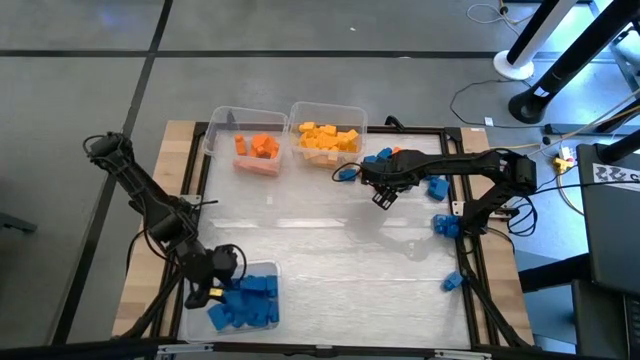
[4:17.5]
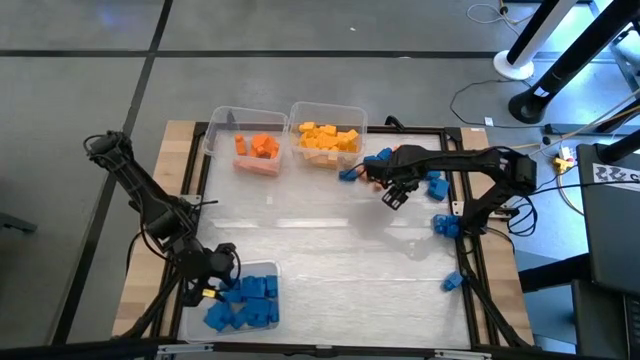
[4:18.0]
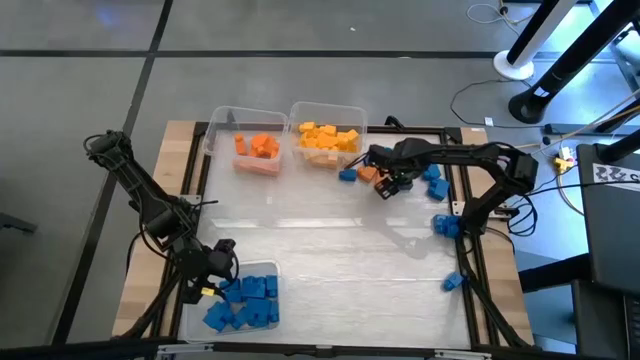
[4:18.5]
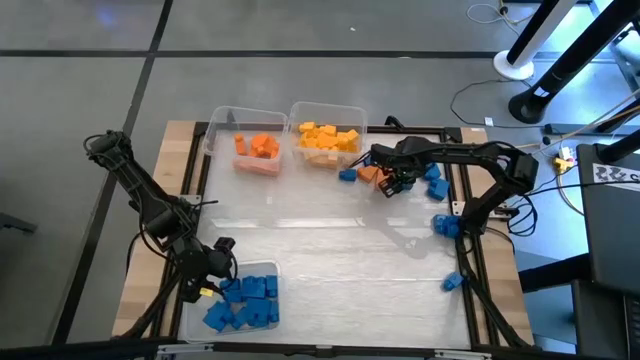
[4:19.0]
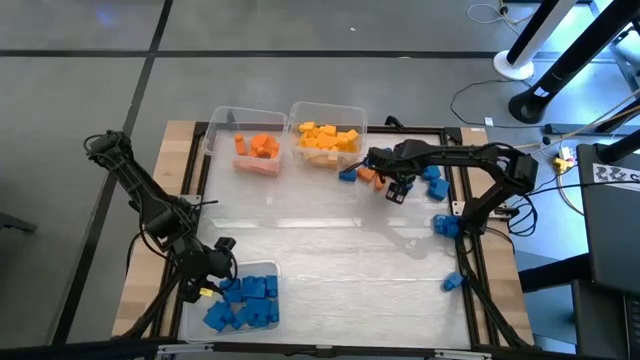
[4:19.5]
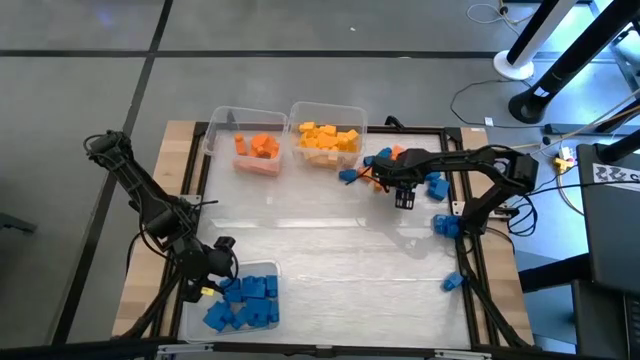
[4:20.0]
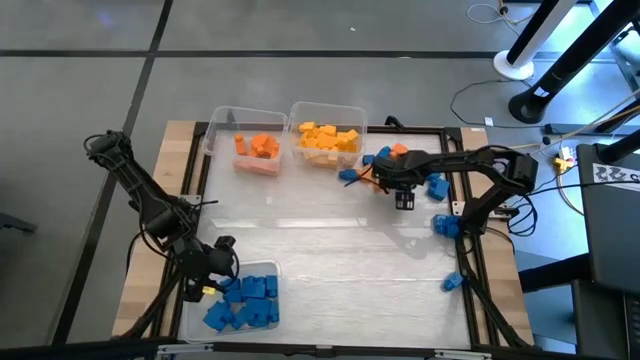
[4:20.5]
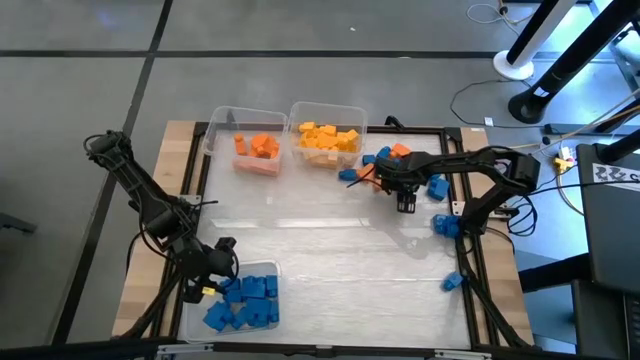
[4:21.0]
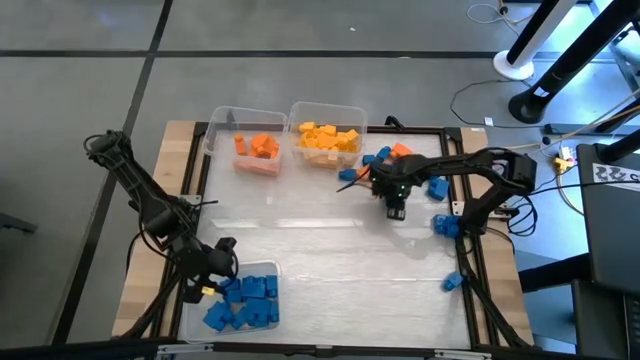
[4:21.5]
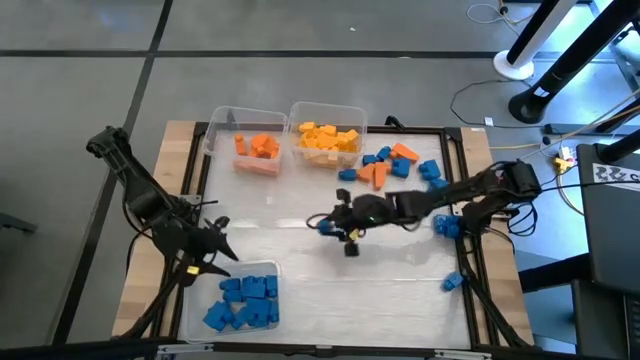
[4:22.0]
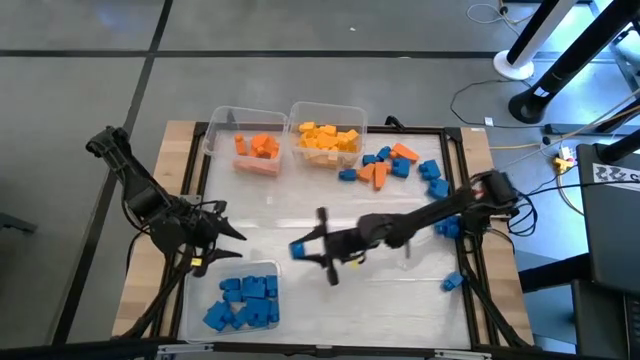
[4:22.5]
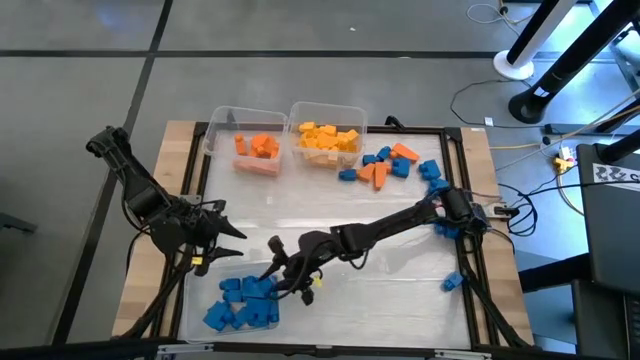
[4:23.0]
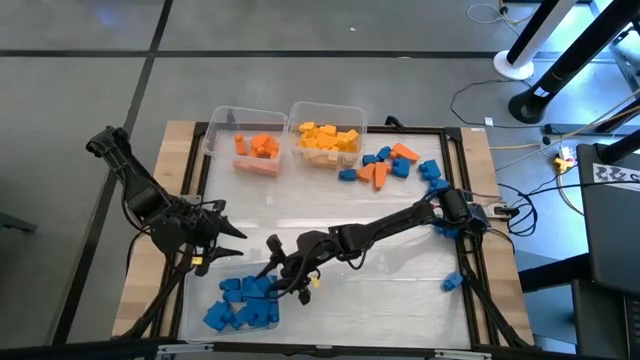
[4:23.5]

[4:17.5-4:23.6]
Task: Sort blocks
Put the blue game piece into the bottom transparent bin

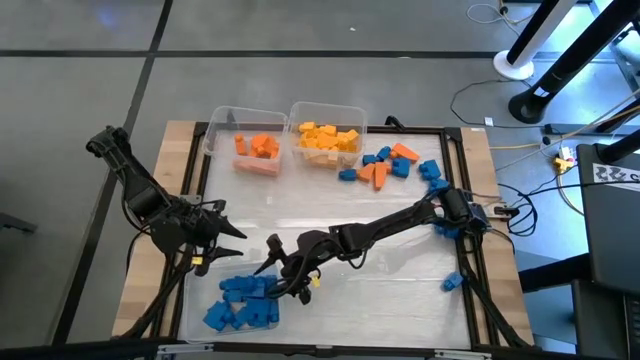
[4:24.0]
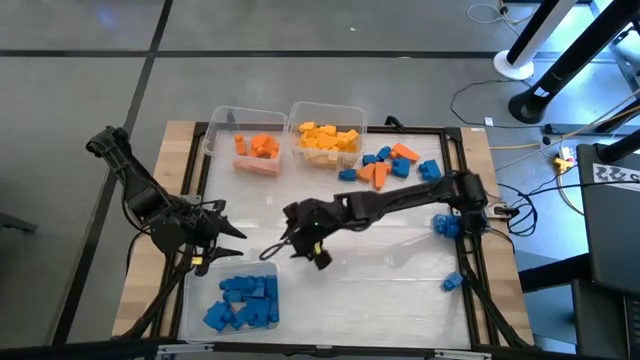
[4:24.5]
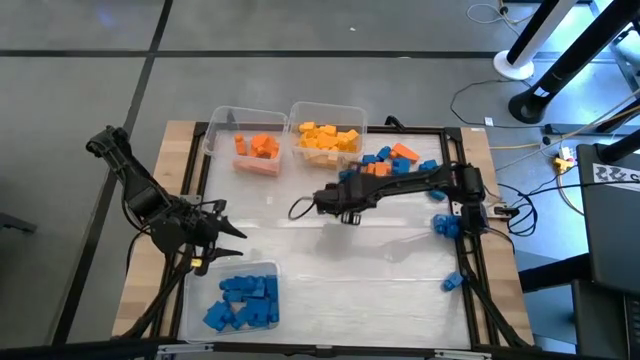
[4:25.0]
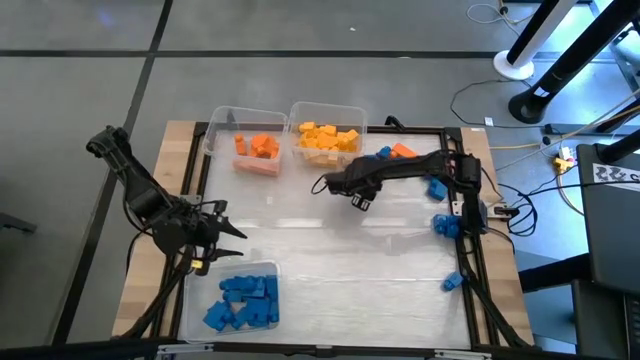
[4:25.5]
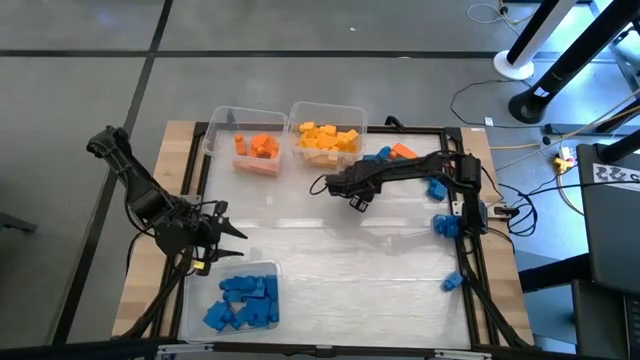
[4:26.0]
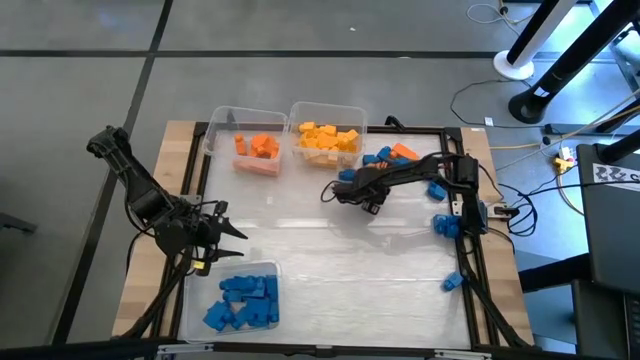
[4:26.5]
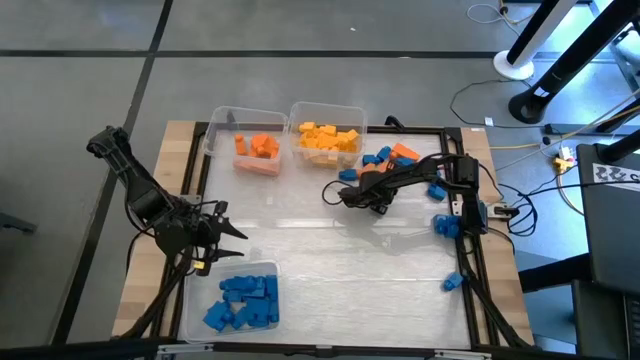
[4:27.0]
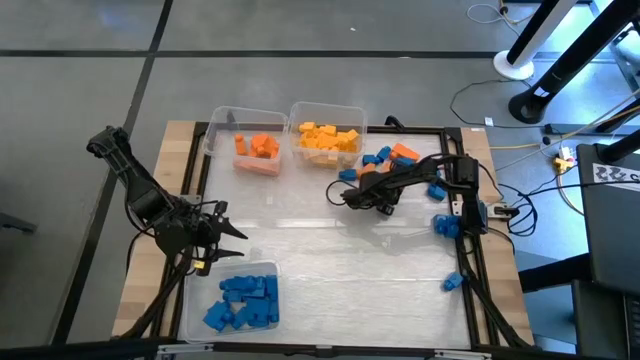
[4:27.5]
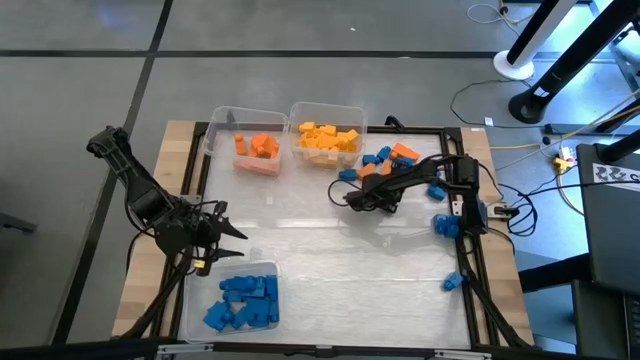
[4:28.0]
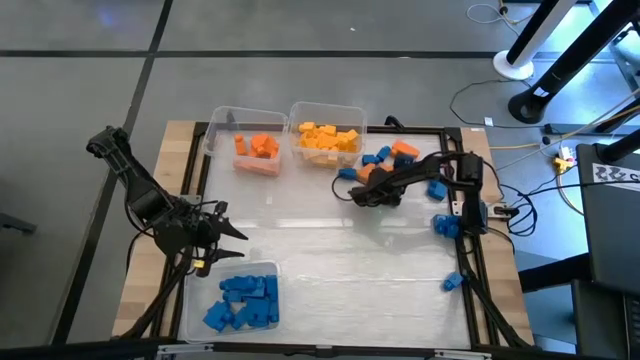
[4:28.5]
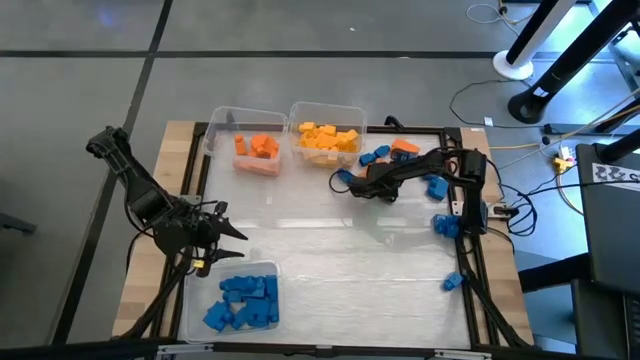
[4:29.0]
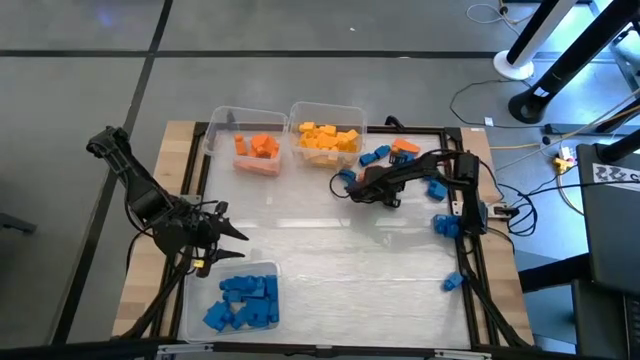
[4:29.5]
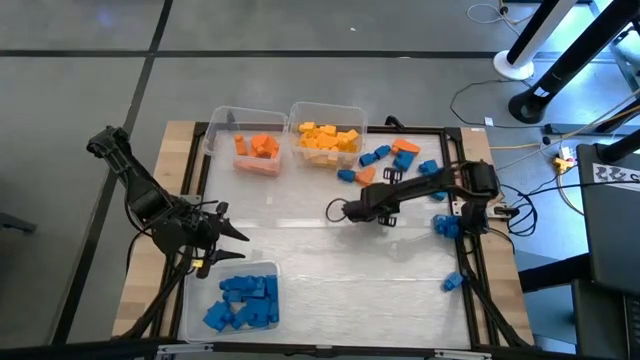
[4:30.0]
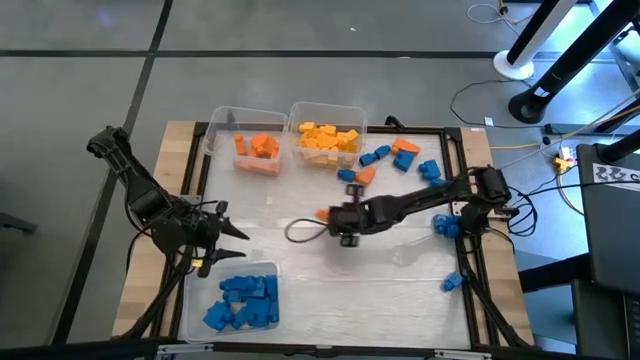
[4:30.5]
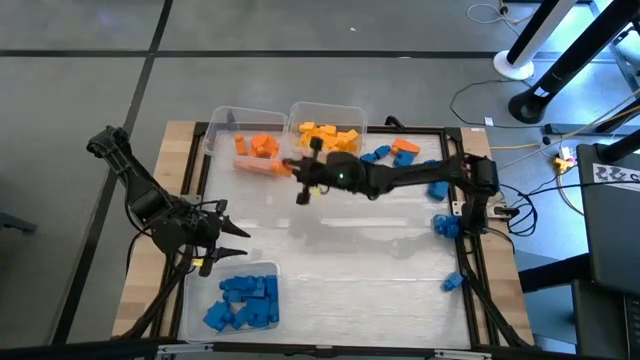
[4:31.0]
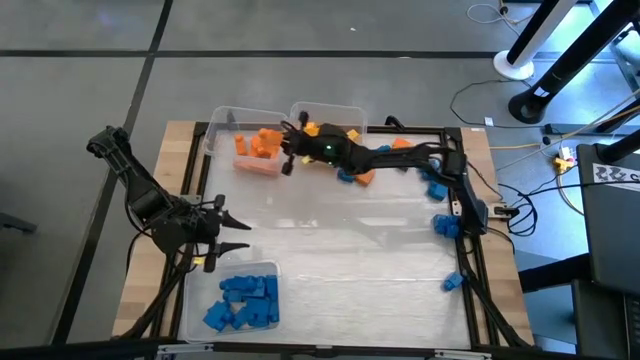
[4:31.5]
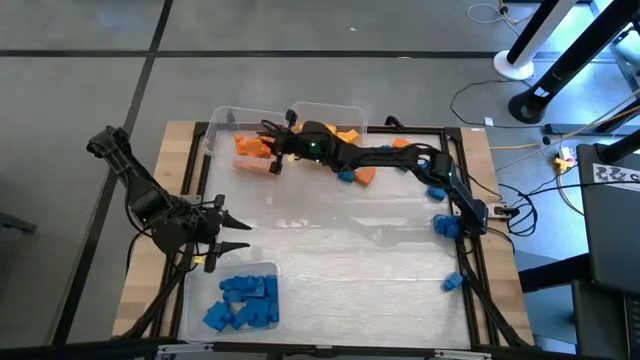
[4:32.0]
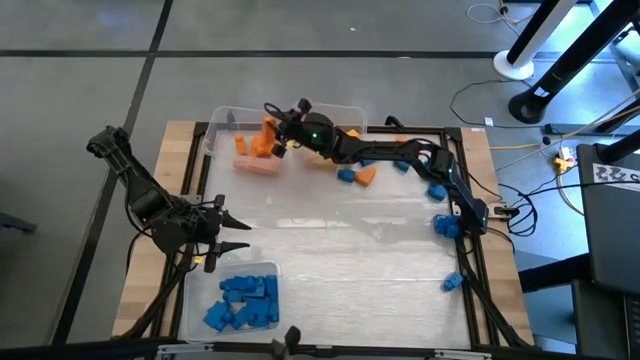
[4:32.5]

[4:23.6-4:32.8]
Put the orange game piece into the top left transparent bin

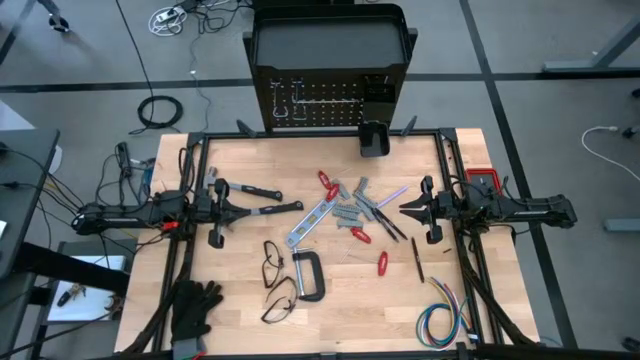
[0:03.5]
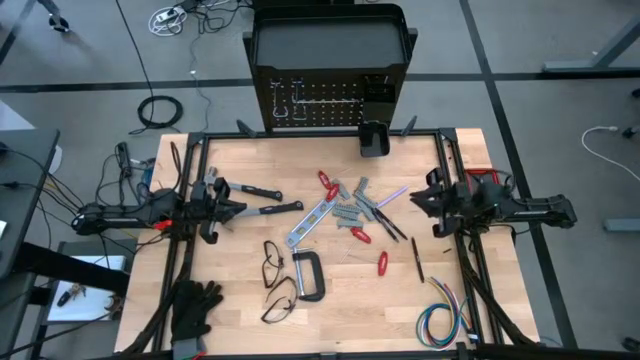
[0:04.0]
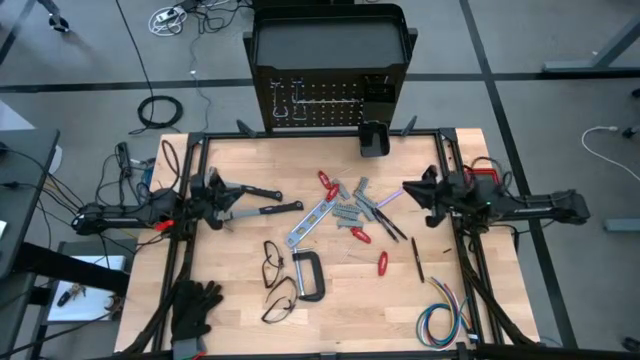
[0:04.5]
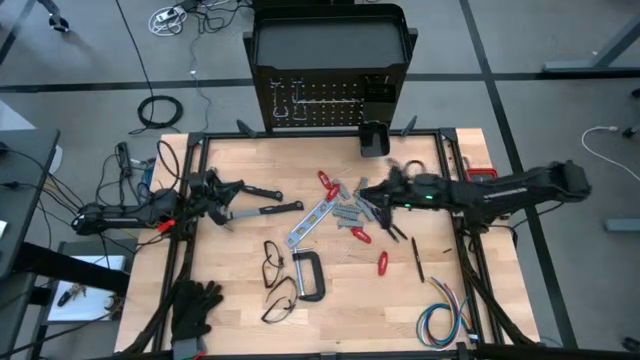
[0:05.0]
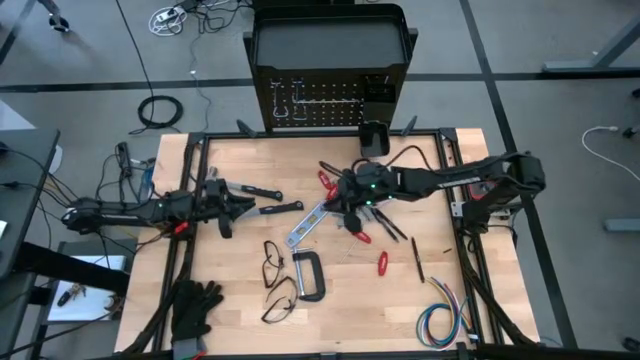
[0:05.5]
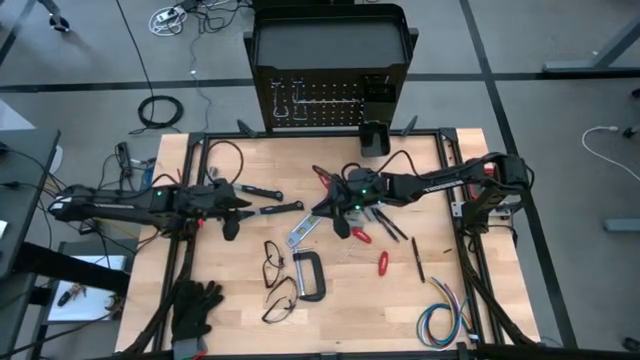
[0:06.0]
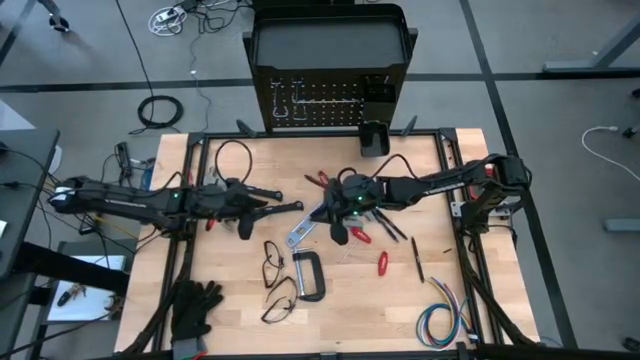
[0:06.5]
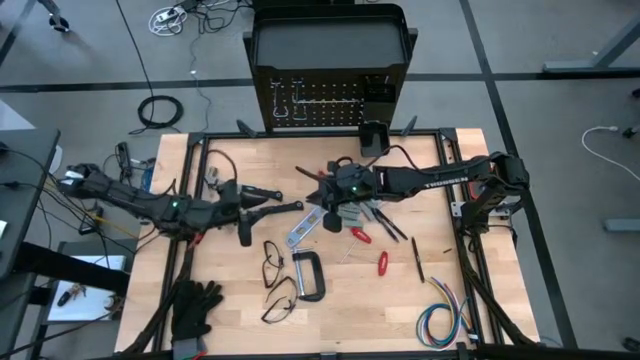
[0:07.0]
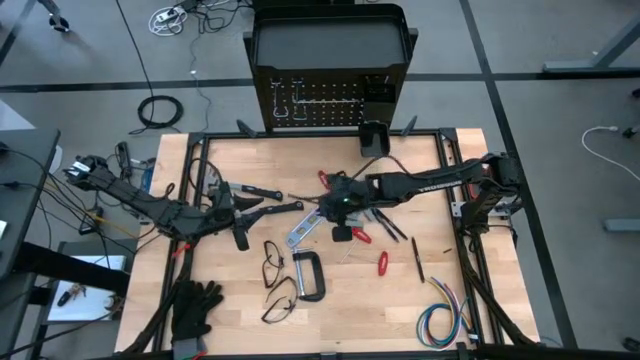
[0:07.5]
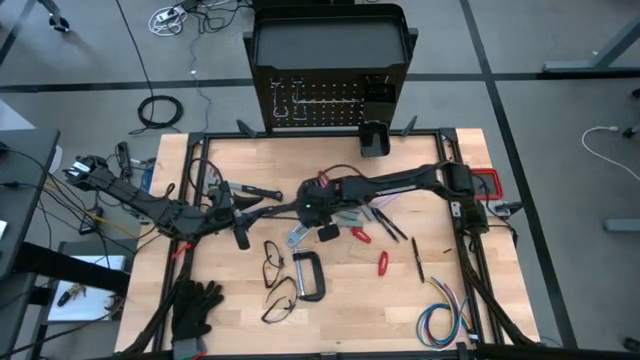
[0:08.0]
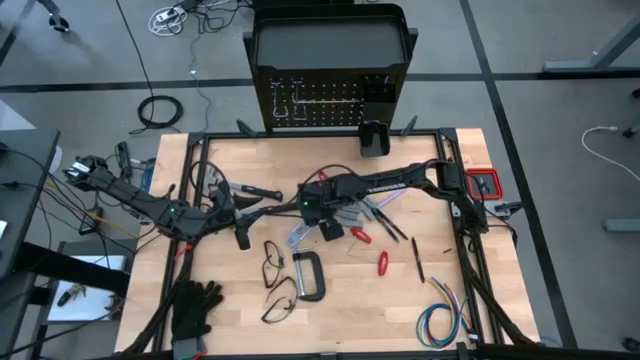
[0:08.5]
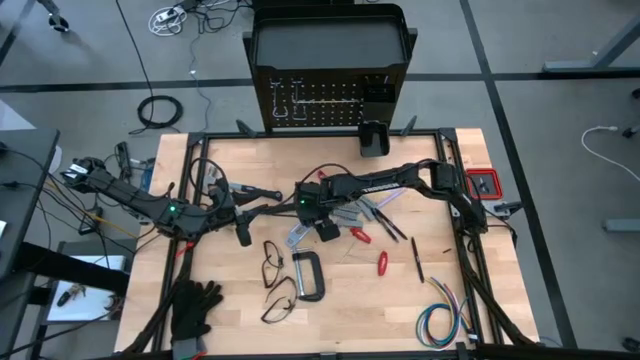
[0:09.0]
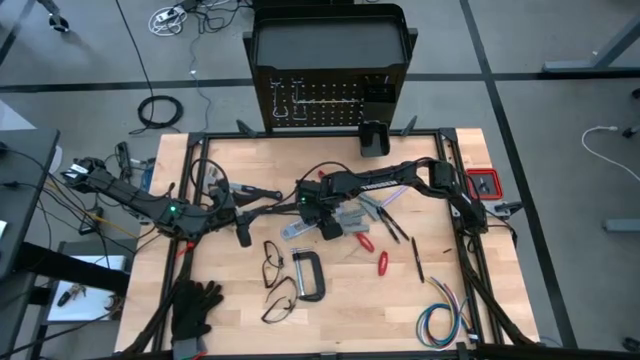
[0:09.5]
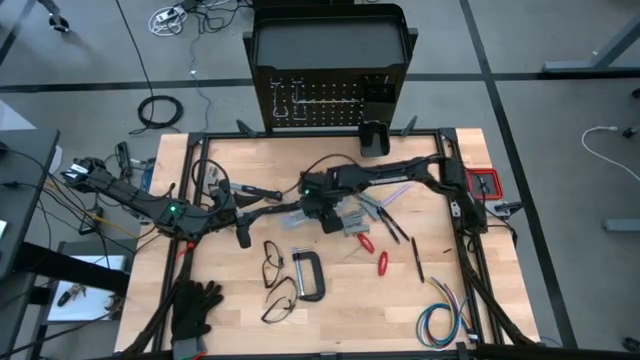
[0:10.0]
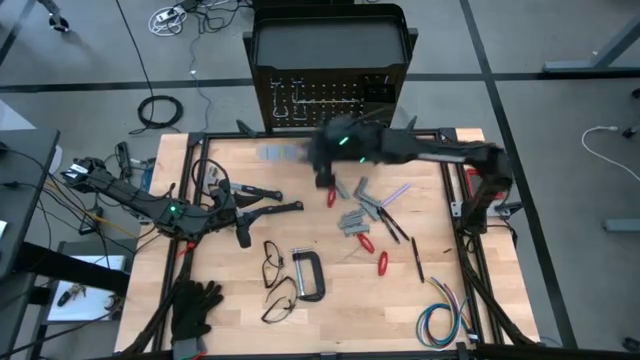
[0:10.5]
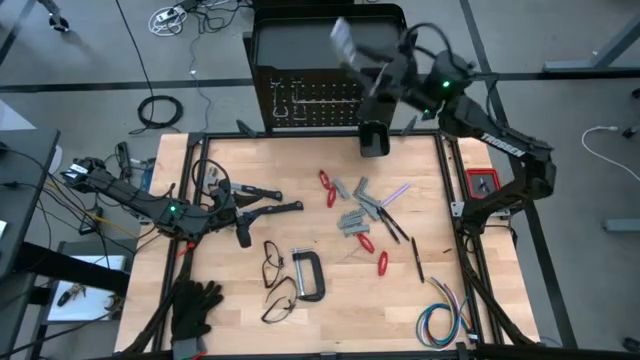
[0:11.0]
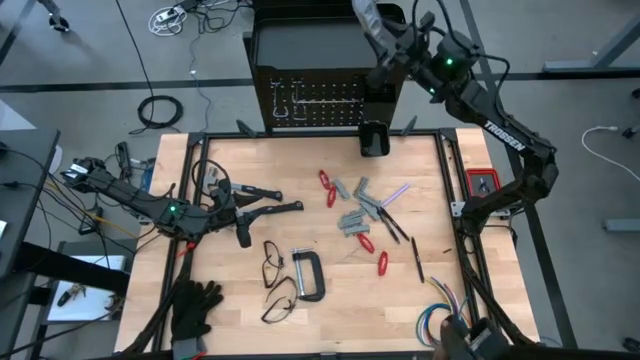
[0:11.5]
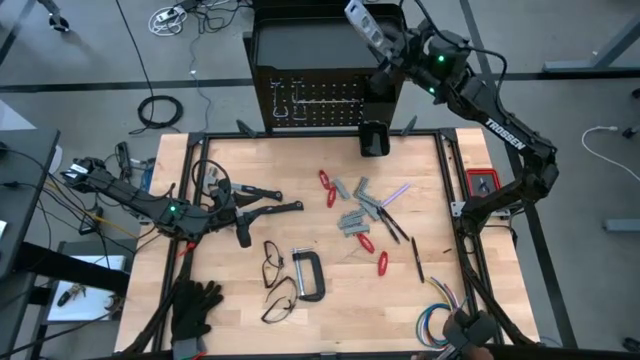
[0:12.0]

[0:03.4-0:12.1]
Task: Hang tools onto peg board
Put the torpedo level on the top of the pegboard
